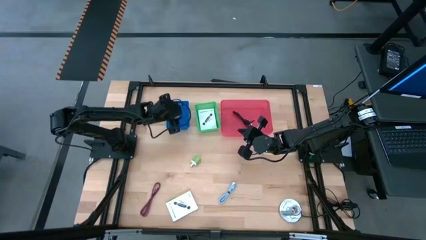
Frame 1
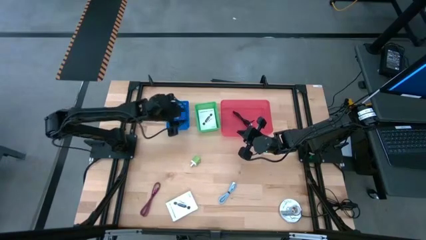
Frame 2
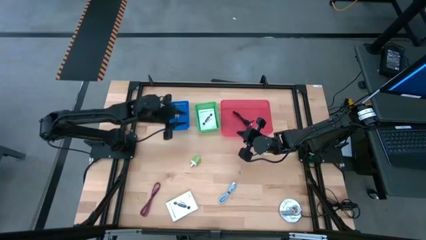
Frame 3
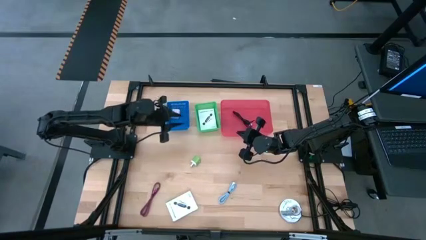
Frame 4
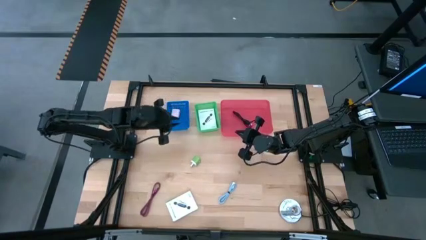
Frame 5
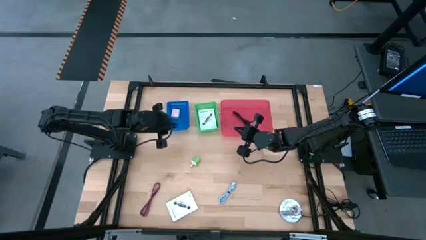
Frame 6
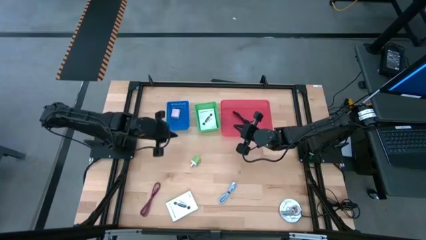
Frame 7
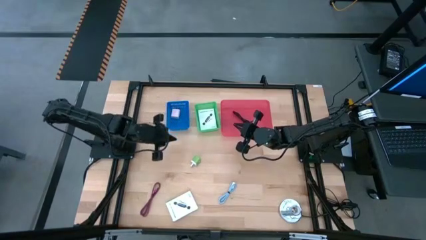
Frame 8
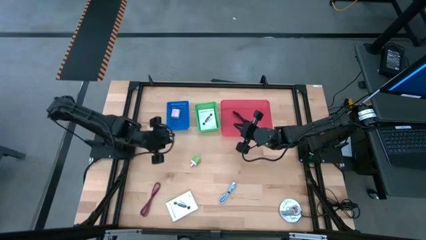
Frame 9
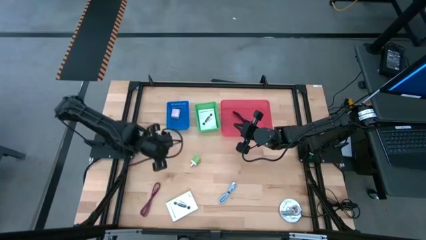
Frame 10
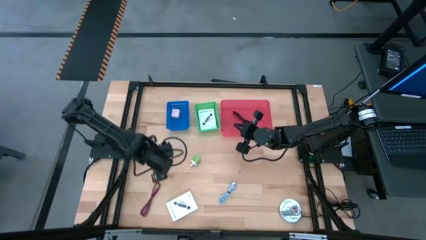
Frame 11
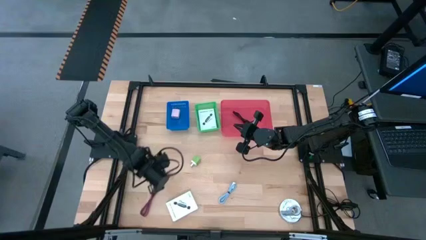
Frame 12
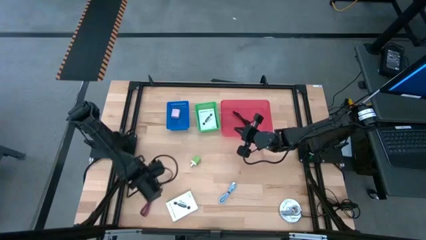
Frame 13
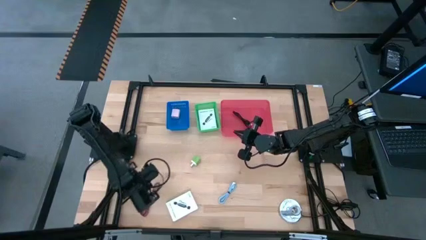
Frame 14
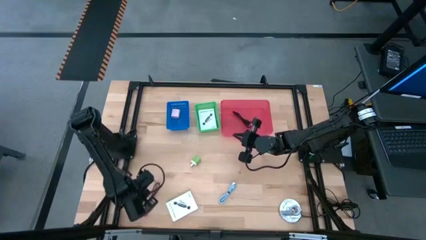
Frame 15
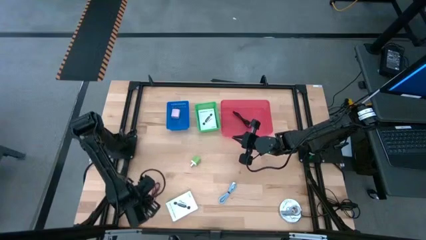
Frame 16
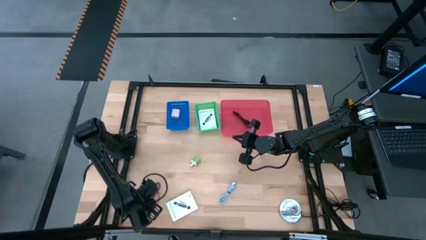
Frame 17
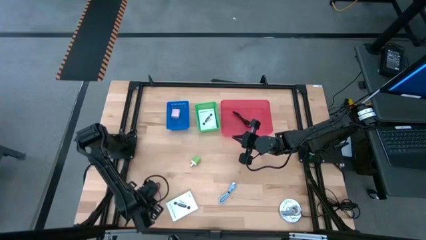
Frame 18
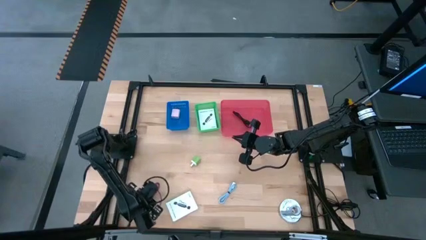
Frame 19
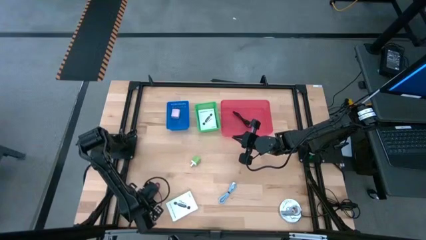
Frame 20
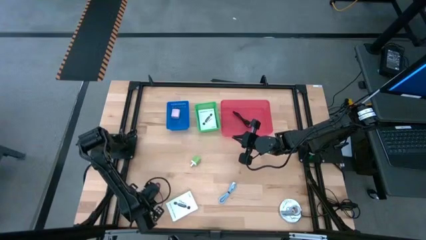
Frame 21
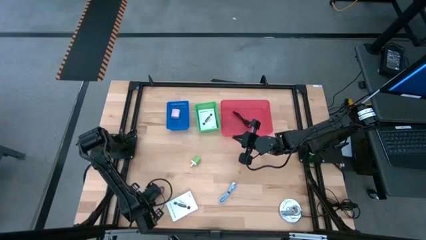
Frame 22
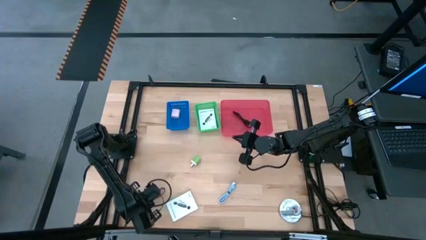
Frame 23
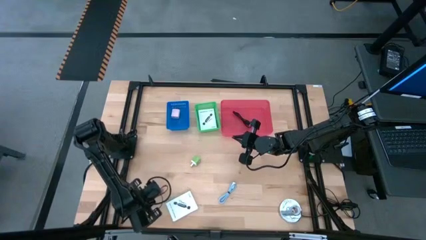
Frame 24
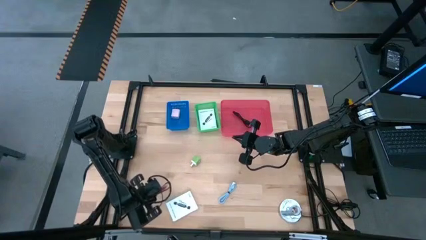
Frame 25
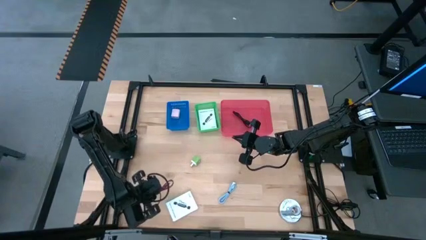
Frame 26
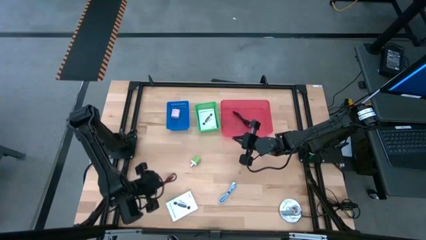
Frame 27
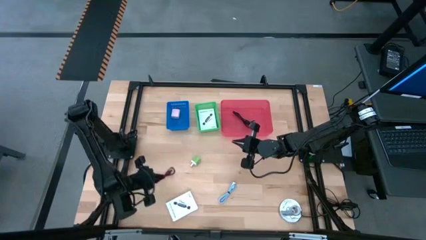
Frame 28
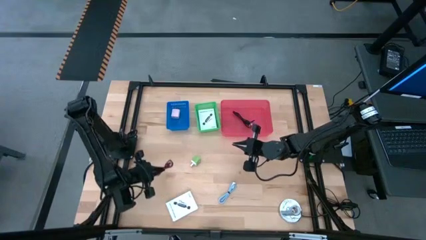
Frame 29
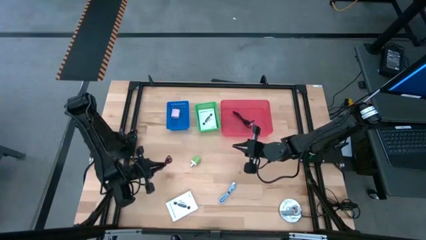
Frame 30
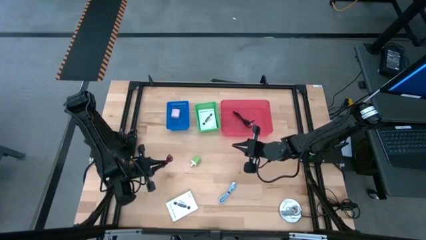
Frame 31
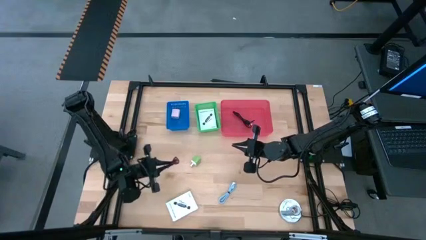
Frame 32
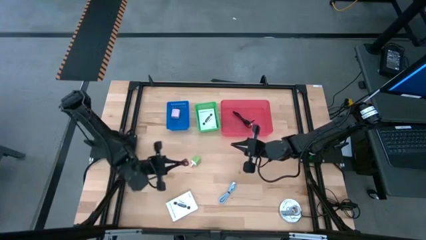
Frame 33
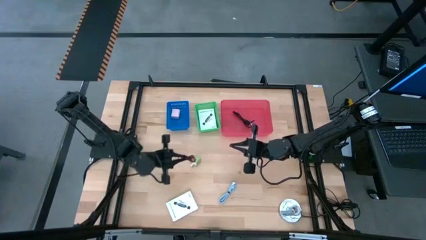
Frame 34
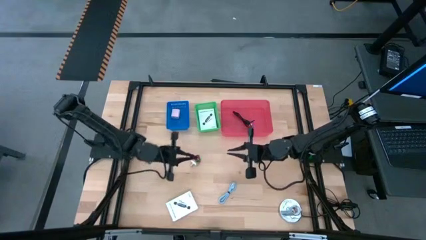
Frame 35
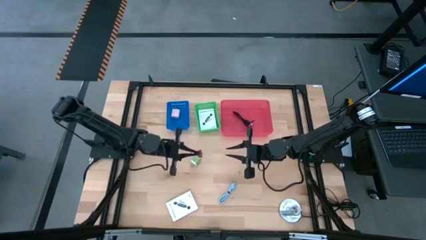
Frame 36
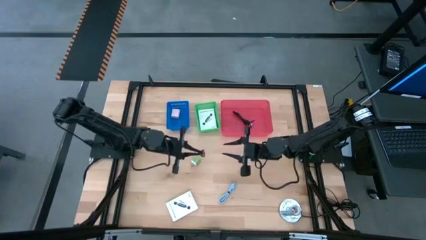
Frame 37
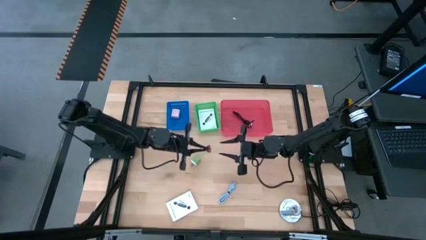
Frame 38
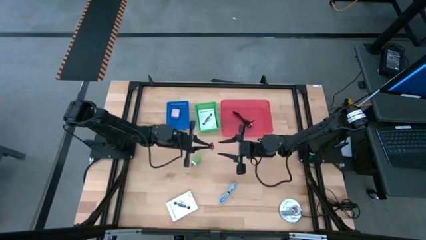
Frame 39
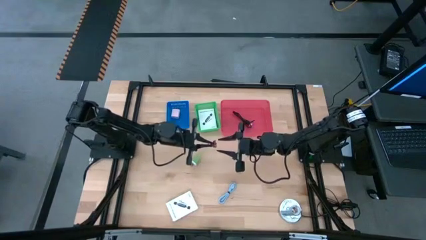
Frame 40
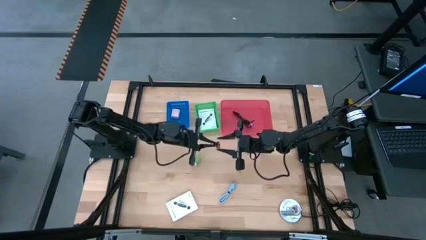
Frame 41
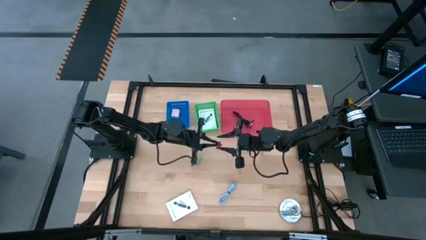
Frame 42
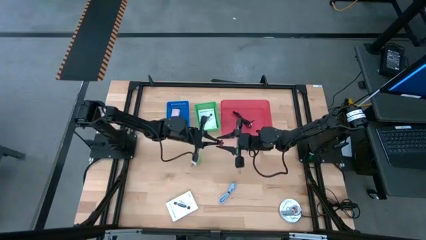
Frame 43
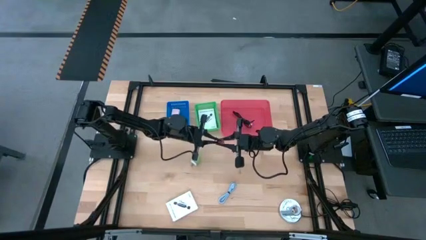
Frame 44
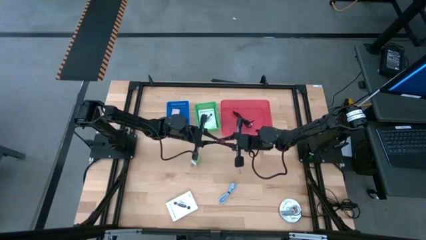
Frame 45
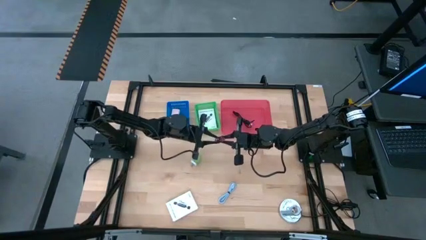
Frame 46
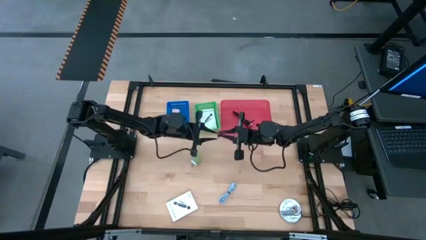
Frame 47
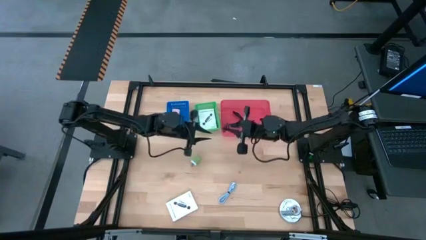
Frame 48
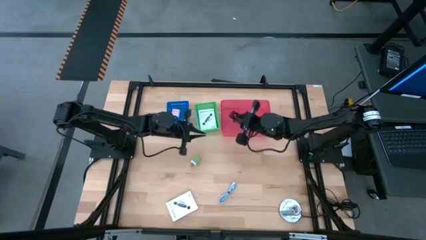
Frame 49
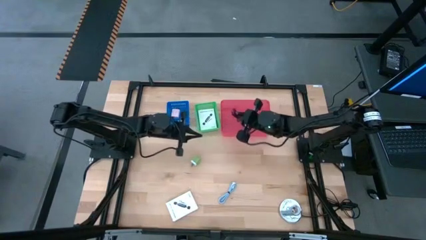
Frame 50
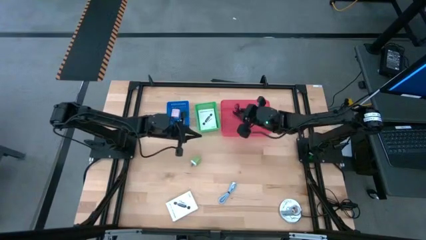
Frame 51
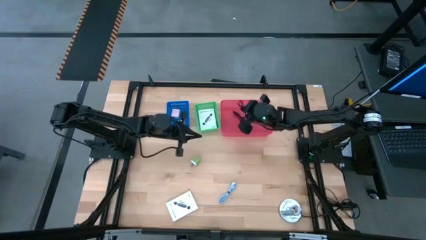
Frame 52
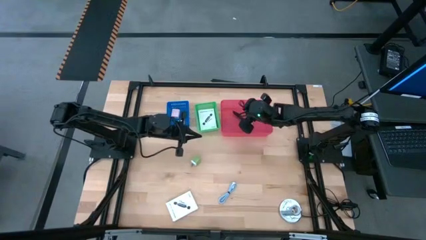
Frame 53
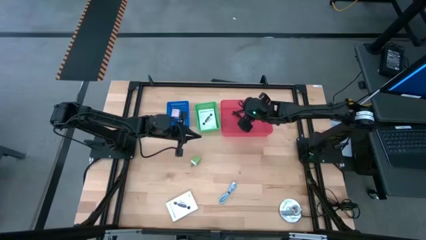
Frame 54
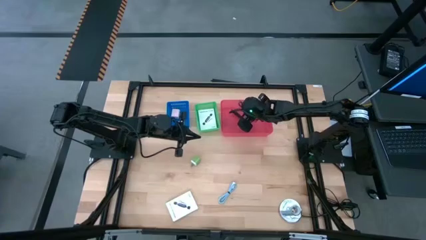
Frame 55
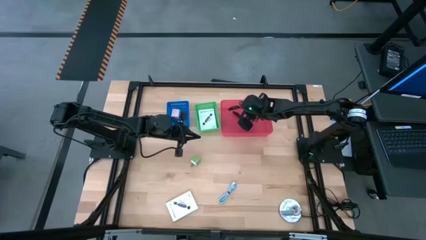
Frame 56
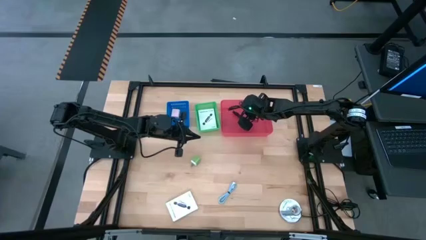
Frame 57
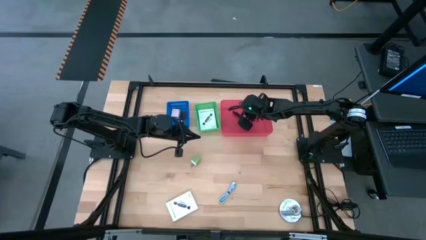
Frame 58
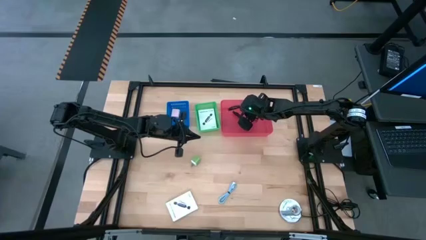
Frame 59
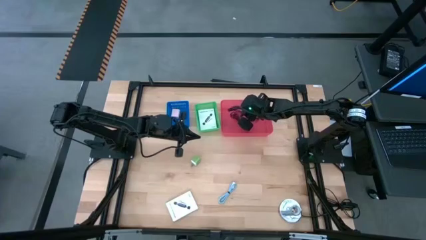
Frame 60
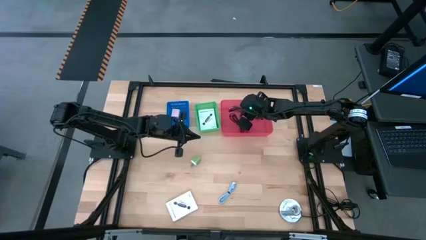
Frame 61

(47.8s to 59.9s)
Task: Pick and place items into bin
Put the red charger cable into the red bin

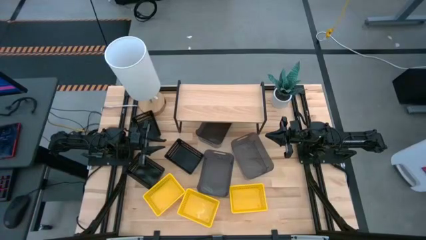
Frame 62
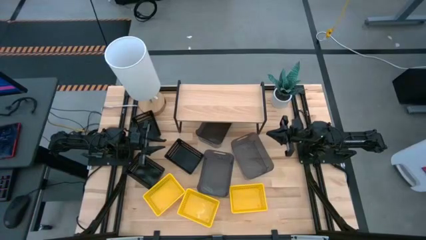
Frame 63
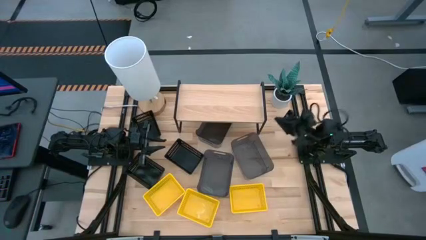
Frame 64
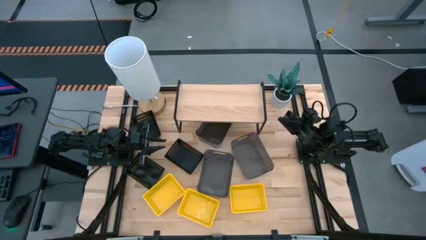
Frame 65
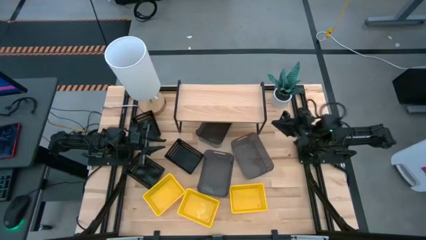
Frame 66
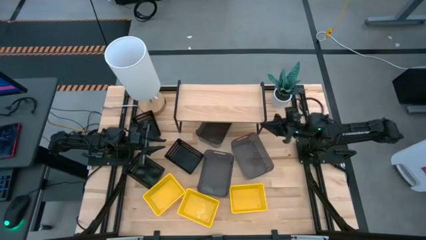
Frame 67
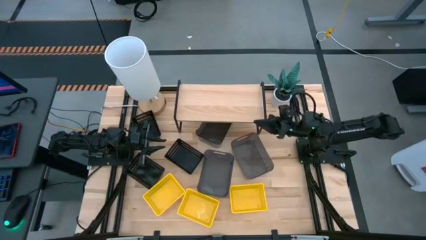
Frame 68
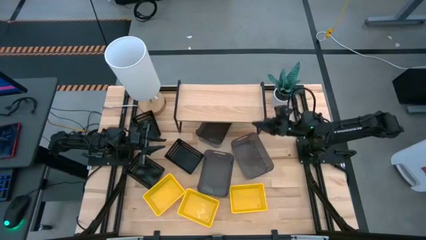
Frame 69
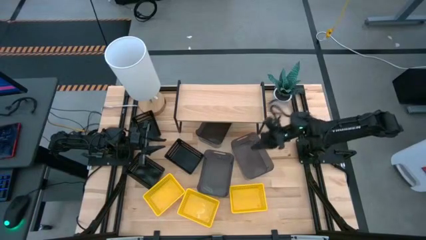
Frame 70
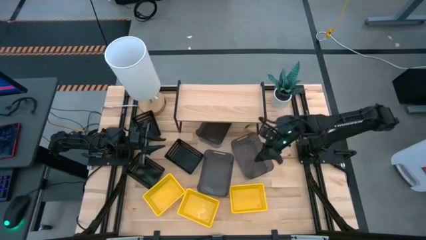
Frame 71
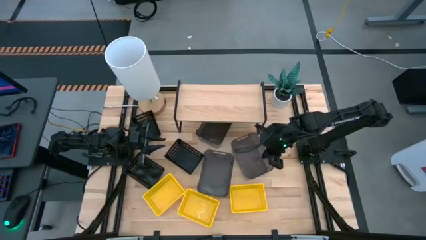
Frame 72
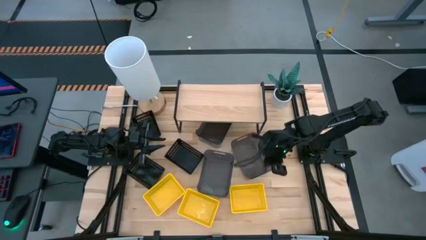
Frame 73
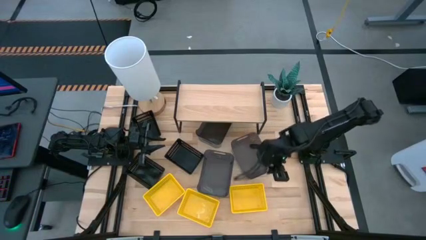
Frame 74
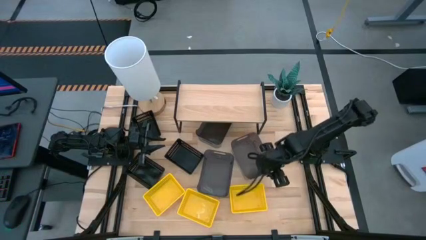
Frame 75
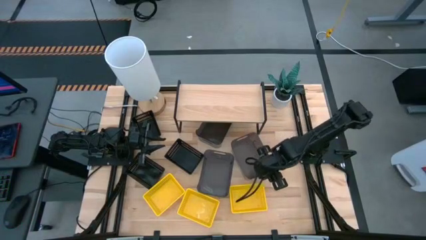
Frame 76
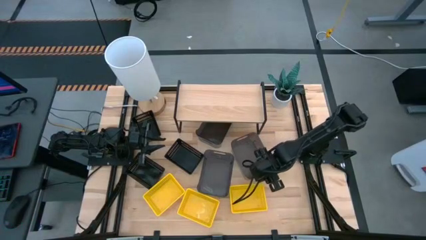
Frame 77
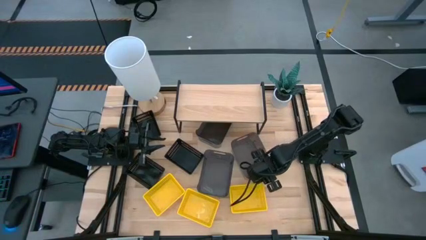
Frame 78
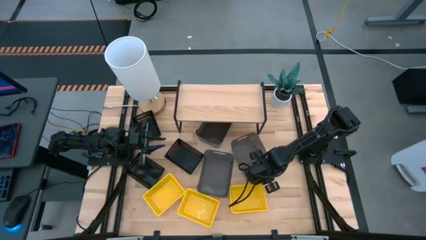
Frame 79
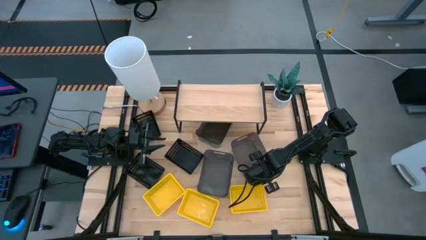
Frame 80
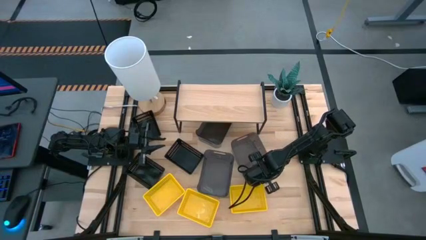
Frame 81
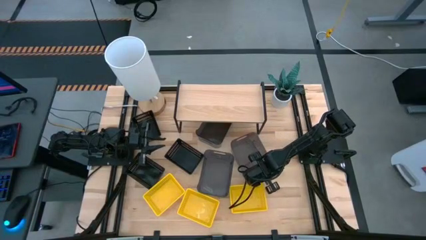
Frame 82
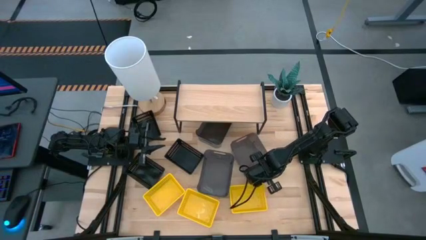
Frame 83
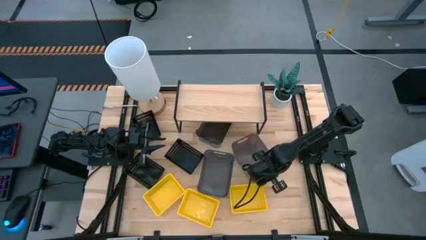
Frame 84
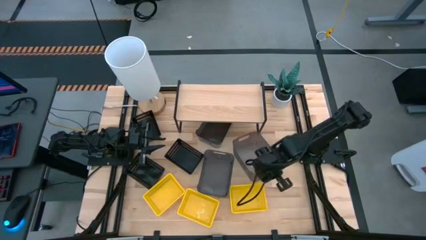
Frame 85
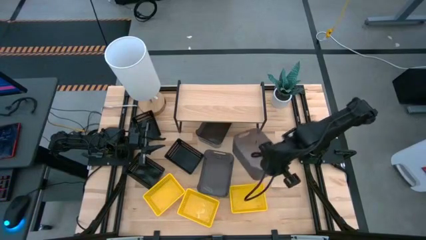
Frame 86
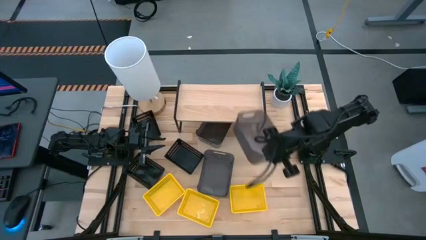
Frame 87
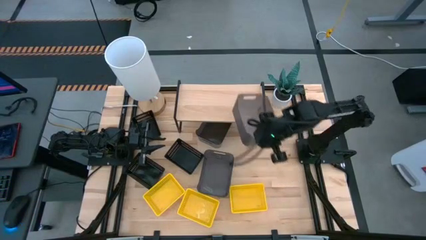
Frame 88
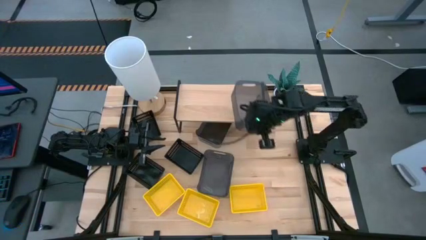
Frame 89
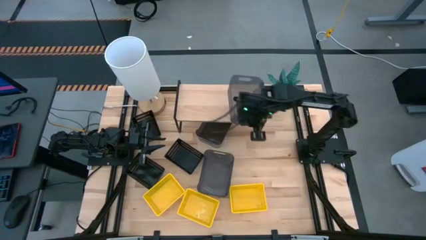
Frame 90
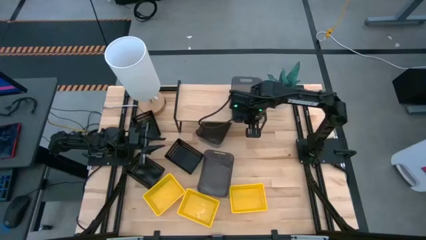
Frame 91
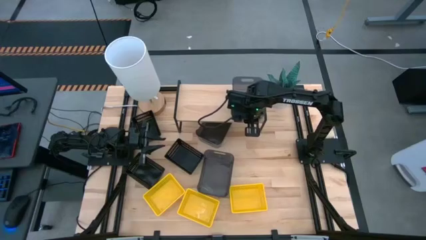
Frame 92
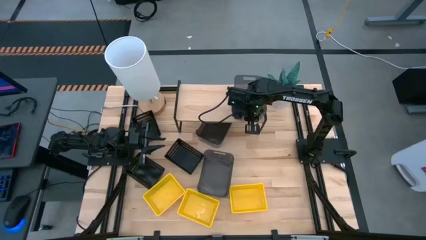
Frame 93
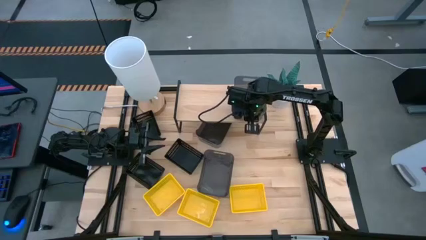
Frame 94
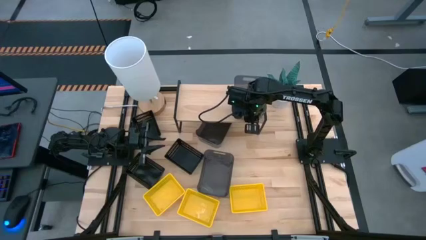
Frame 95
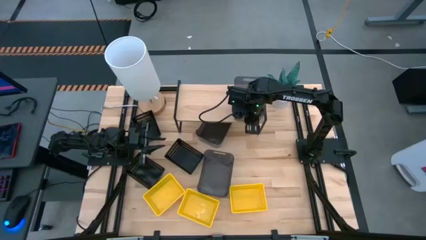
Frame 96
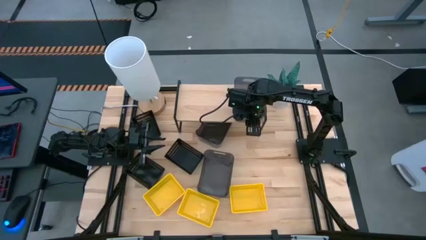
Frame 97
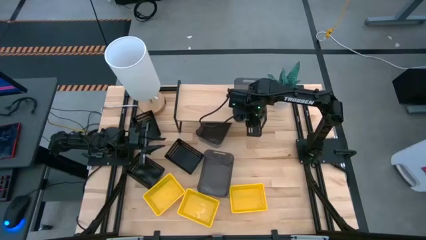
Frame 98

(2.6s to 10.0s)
Task: Stack baskets on shelf by color
Put the bottom right black bin on the shelf
